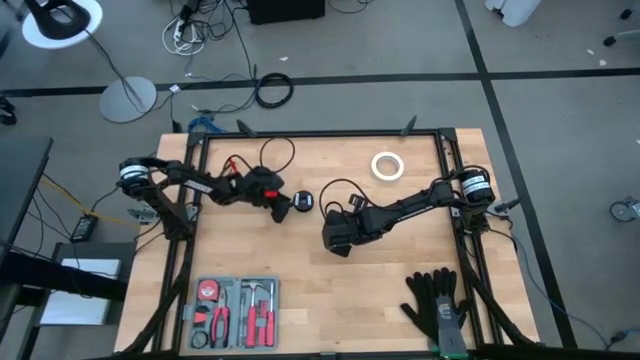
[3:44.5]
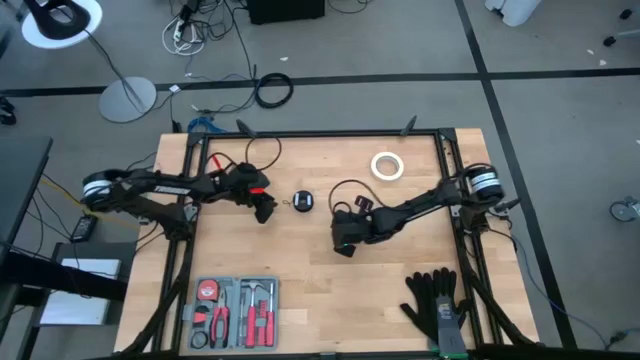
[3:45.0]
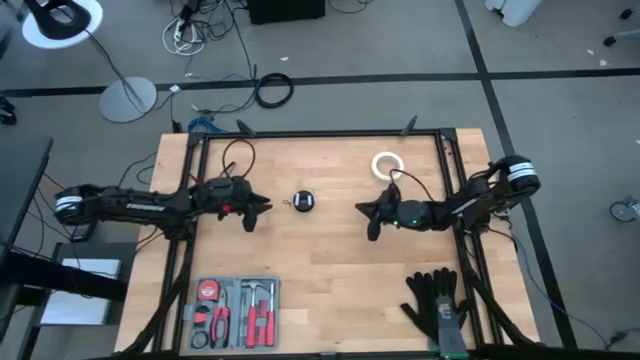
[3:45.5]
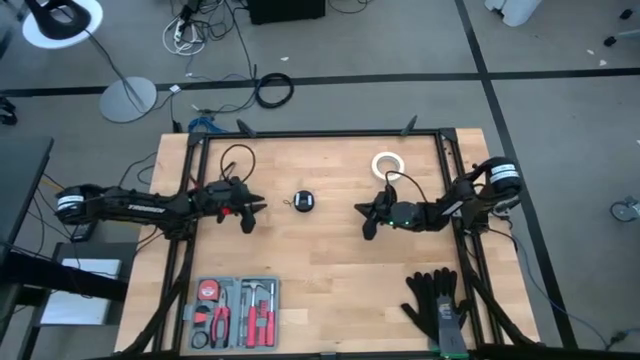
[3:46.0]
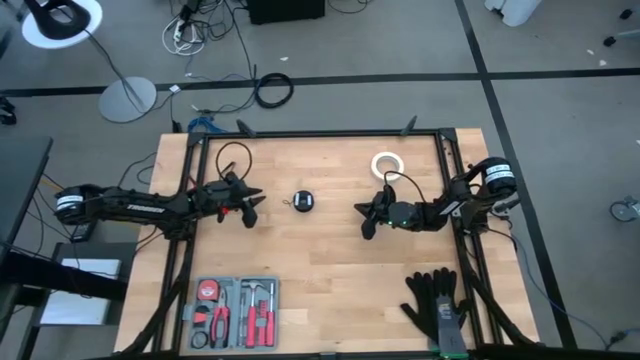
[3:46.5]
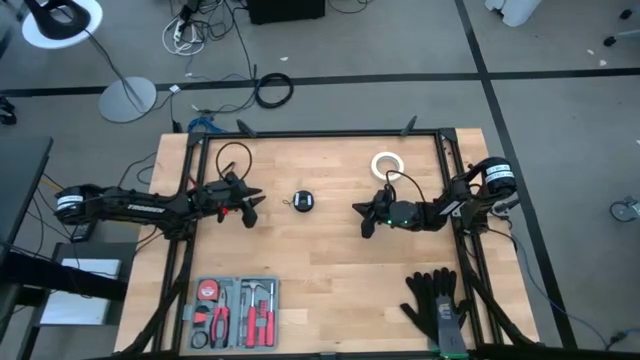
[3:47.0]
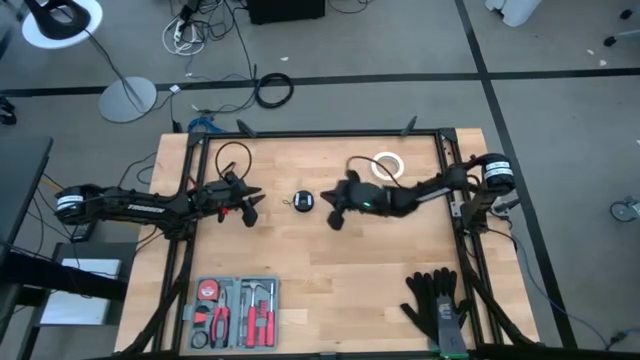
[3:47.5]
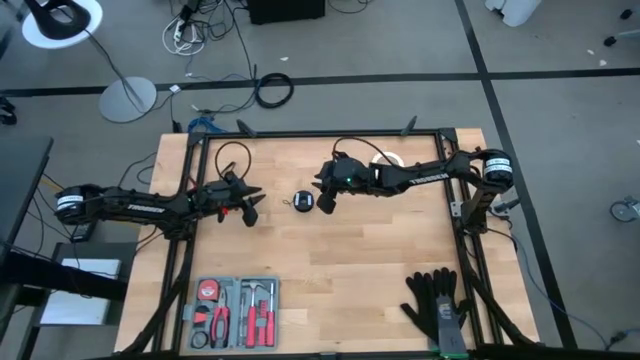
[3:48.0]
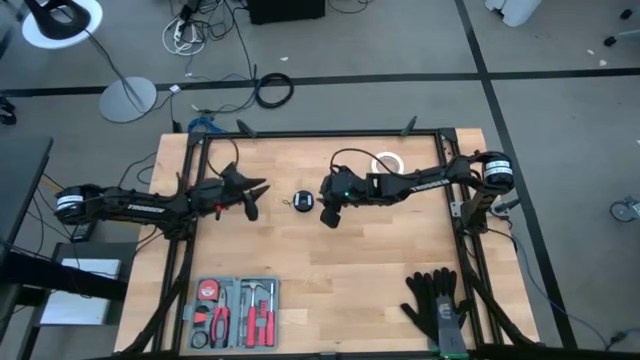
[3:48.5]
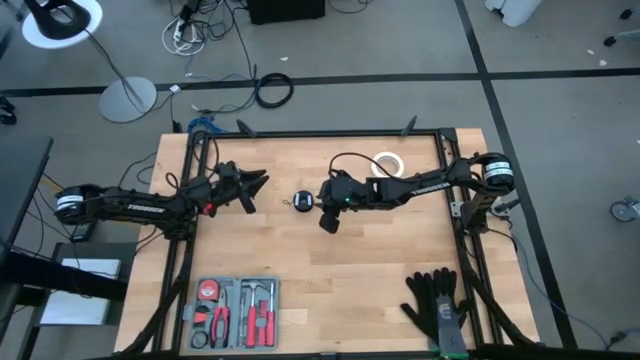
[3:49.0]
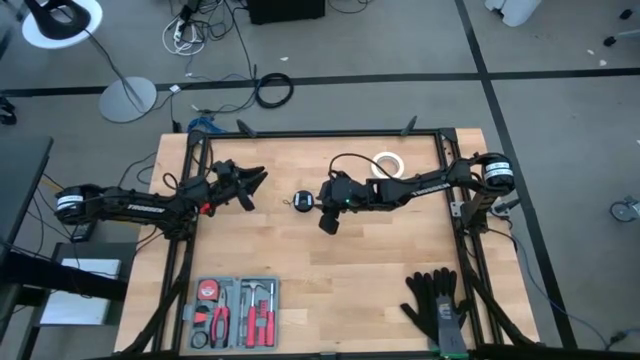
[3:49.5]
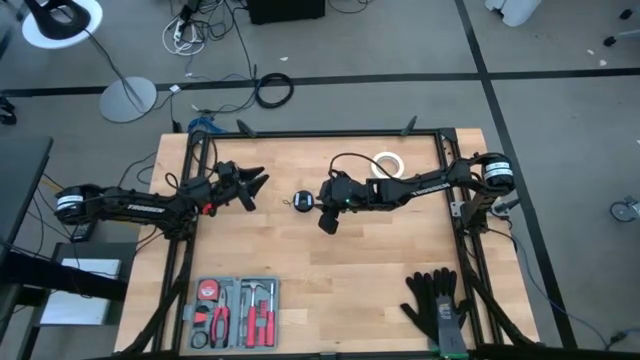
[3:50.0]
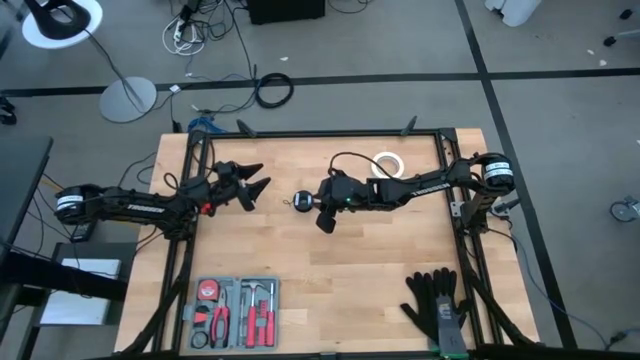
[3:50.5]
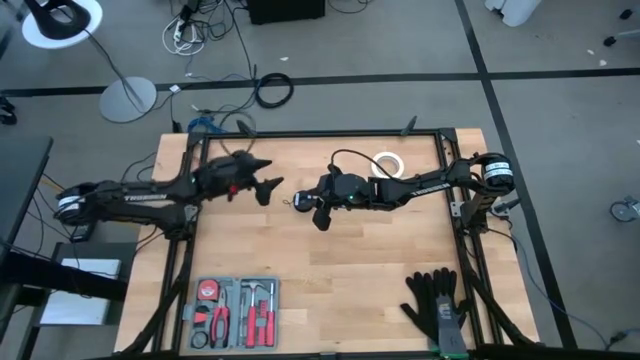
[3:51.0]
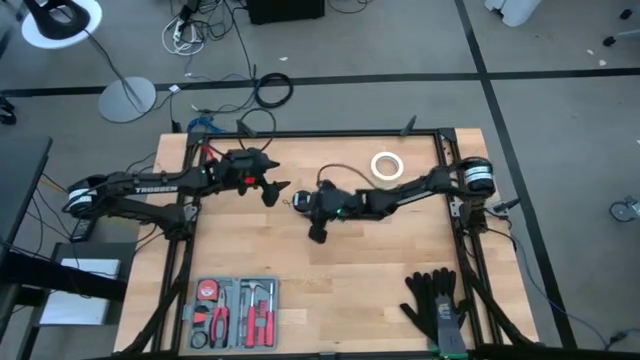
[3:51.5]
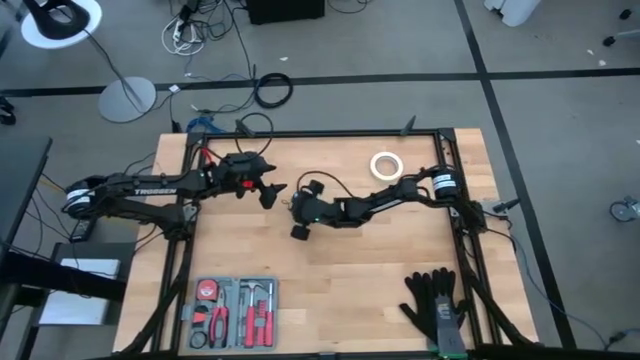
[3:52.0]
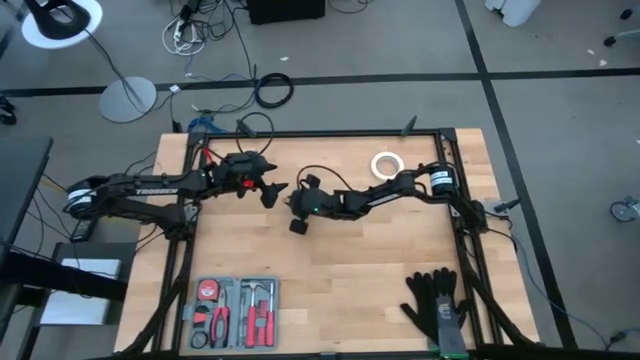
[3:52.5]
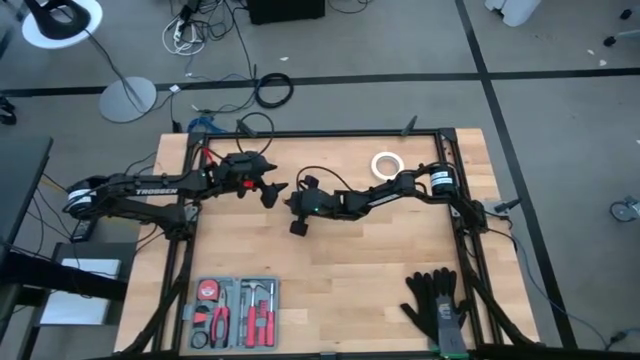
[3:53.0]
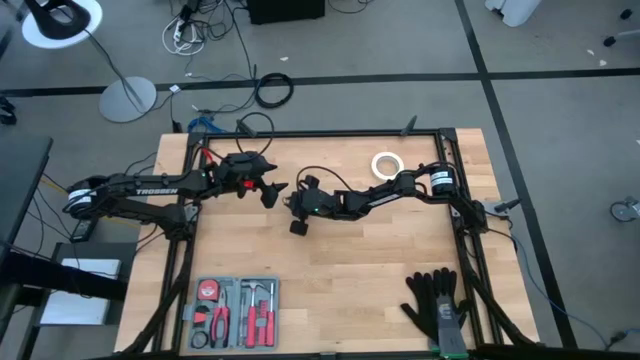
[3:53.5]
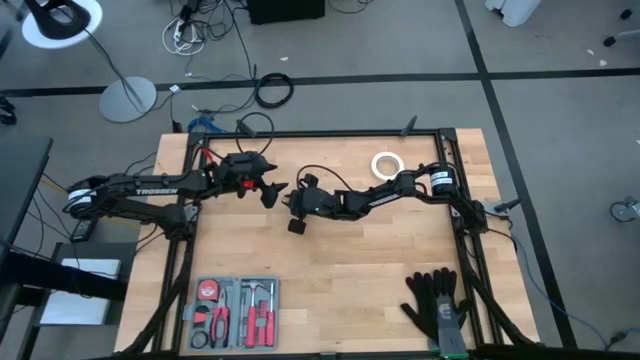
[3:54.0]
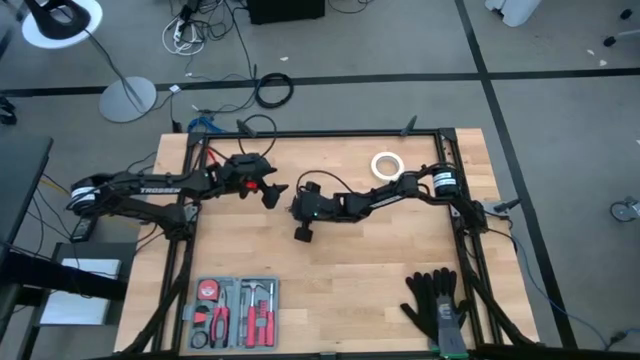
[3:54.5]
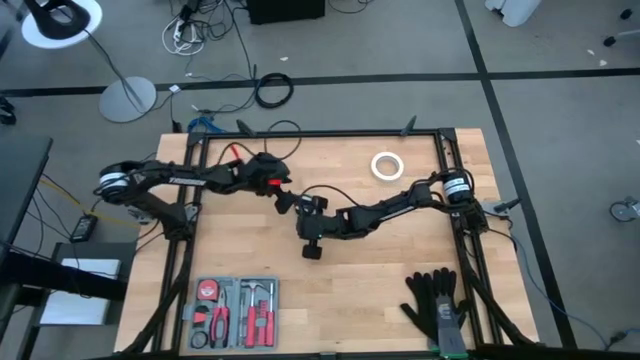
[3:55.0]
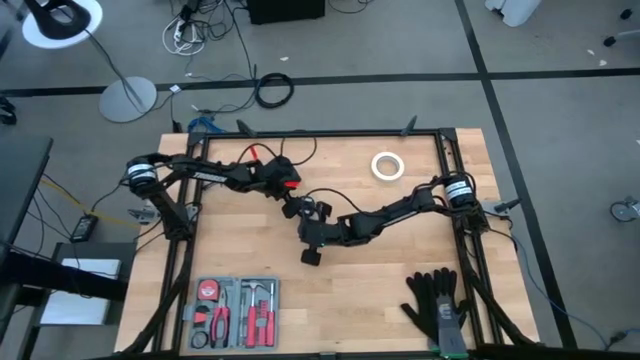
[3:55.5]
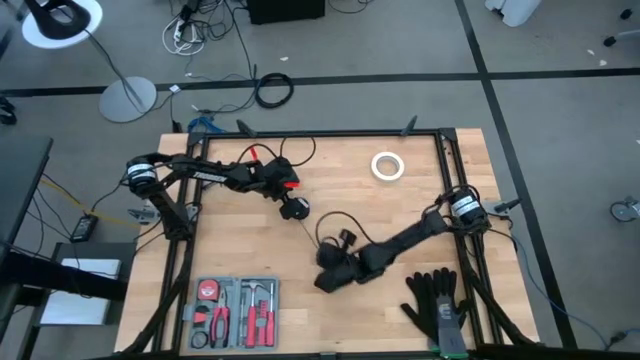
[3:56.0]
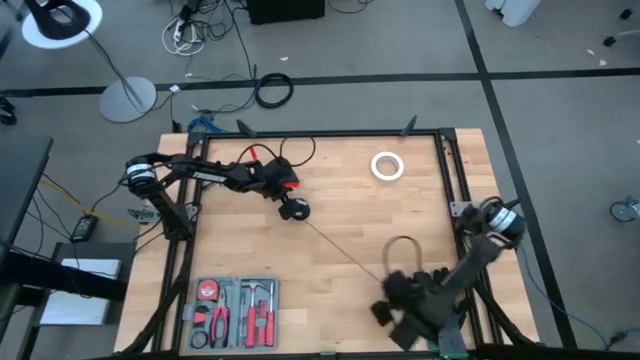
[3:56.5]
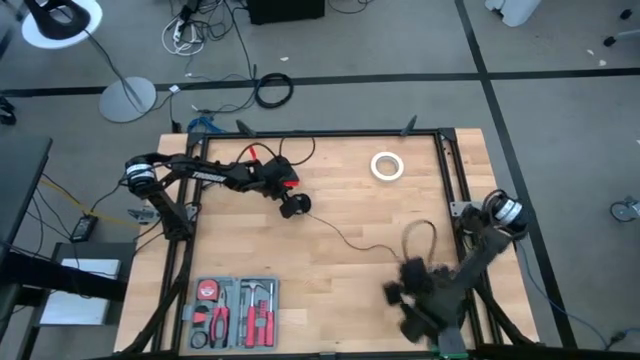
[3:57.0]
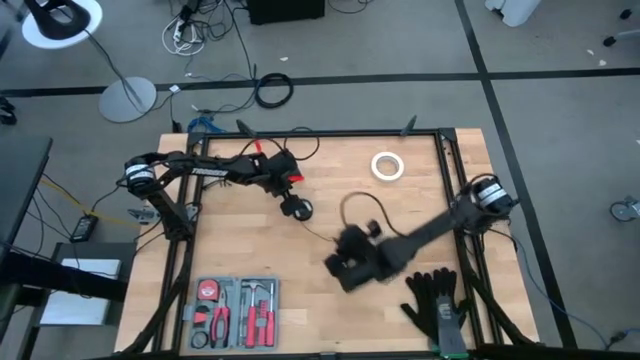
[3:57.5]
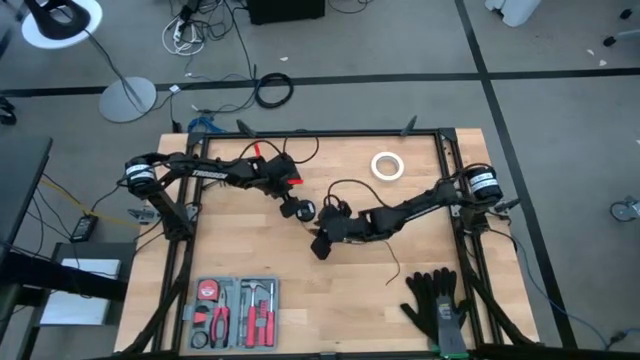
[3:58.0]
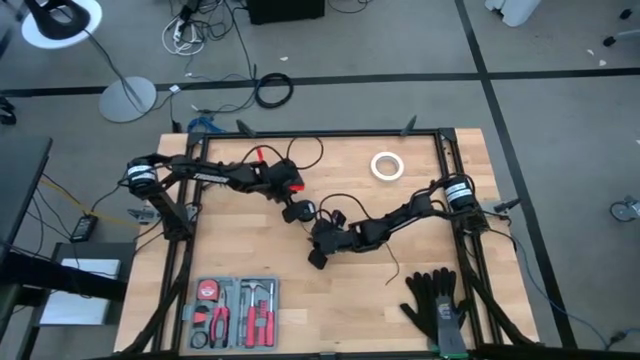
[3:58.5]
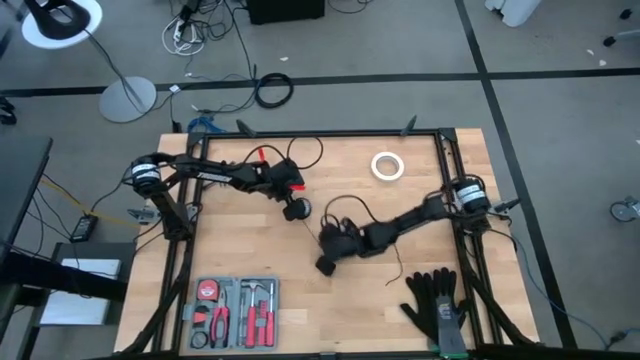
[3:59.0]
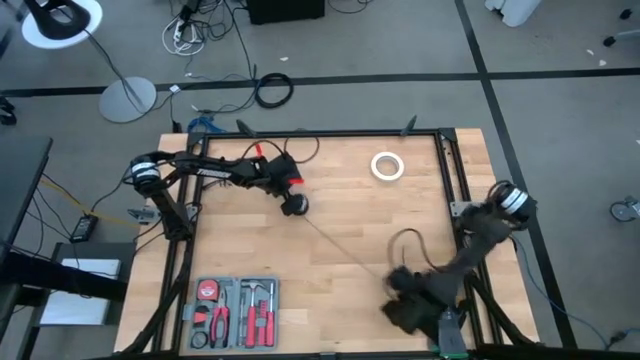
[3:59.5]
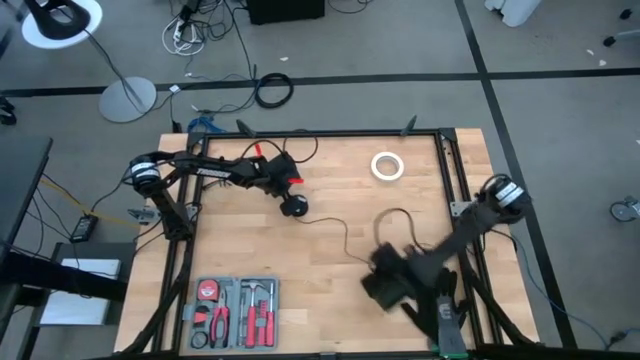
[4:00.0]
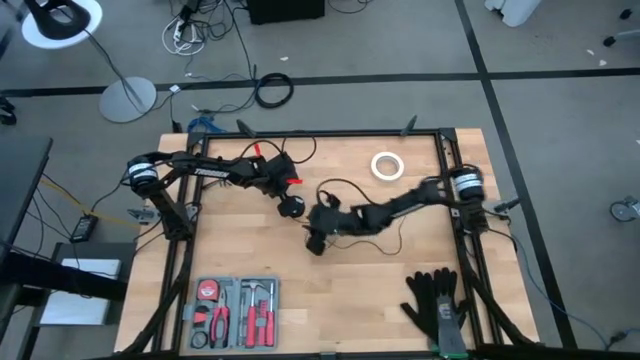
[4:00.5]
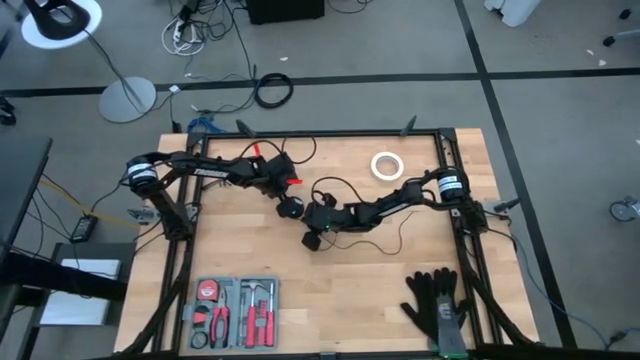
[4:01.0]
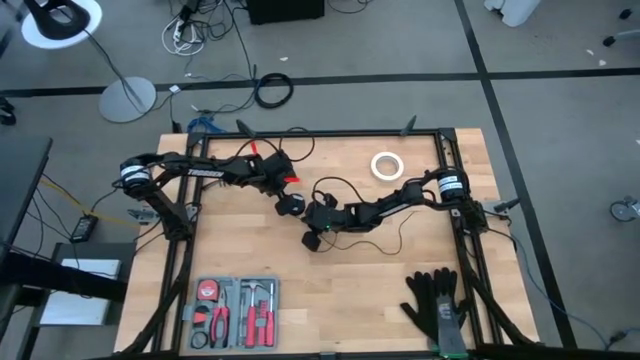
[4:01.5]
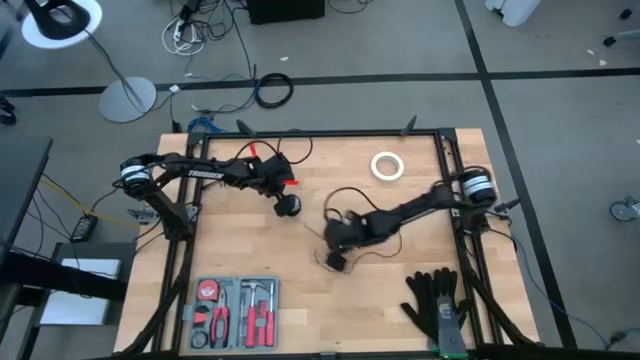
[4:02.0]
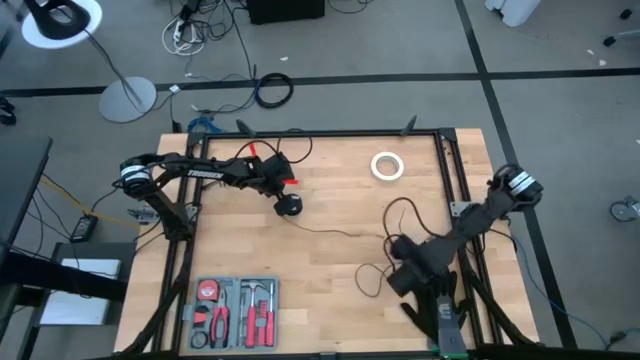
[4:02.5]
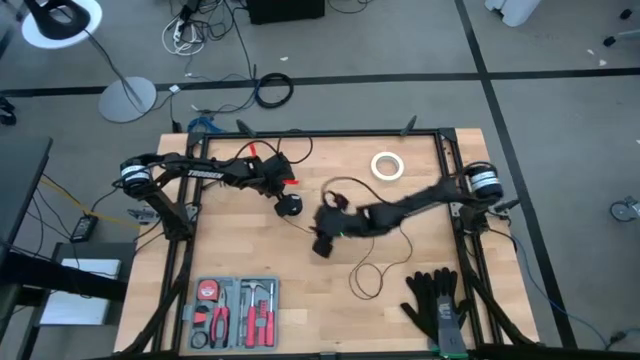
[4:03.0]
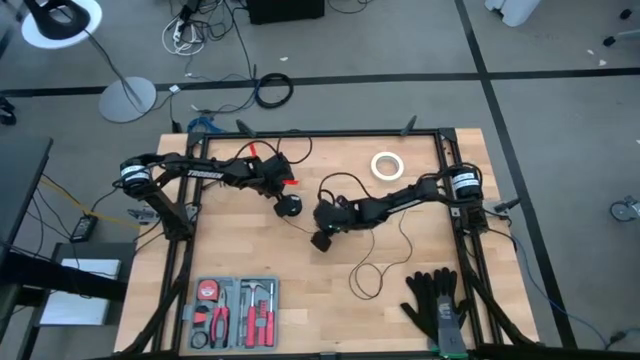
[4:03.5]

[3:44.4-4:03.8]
Task: Coil cords
Uncoil the black wire from the black spool

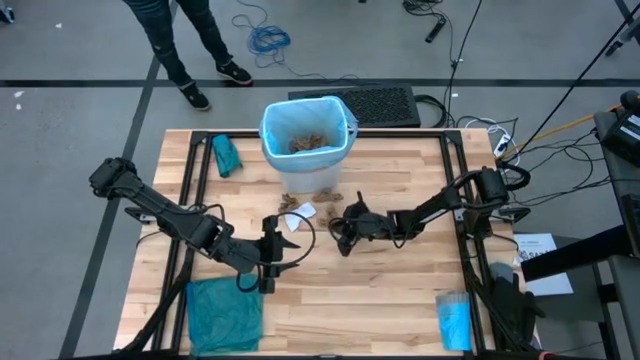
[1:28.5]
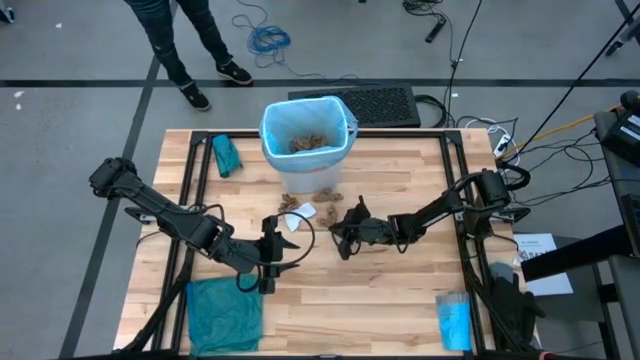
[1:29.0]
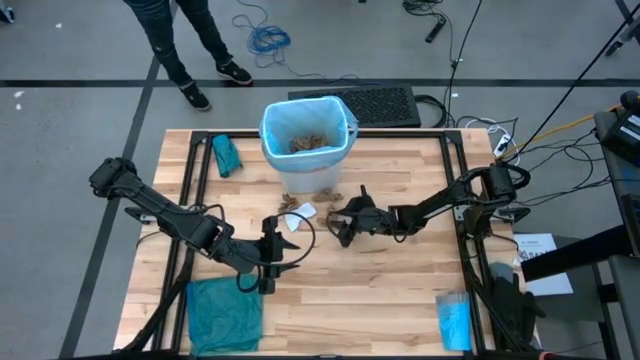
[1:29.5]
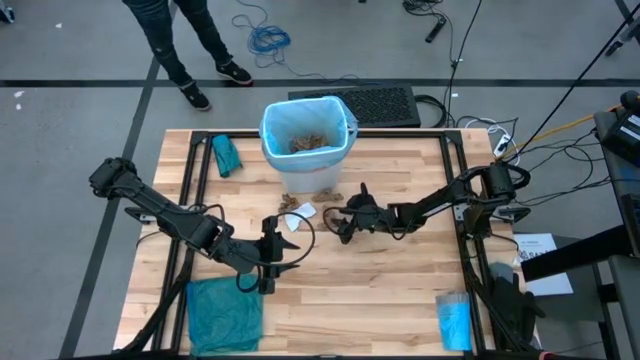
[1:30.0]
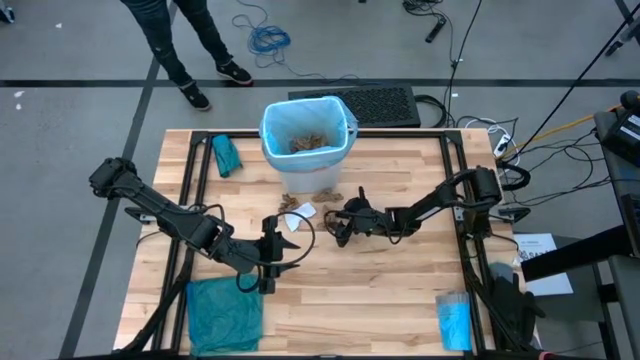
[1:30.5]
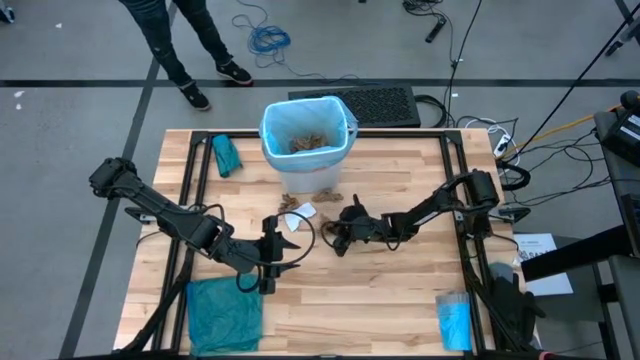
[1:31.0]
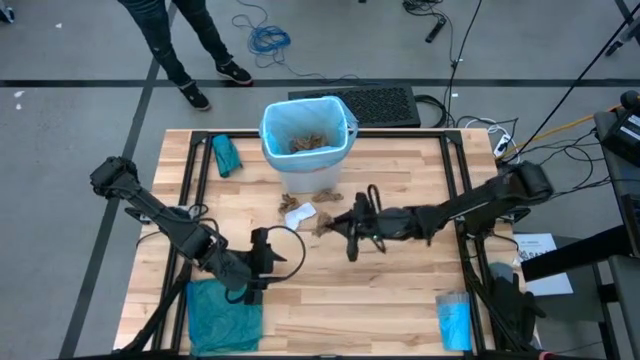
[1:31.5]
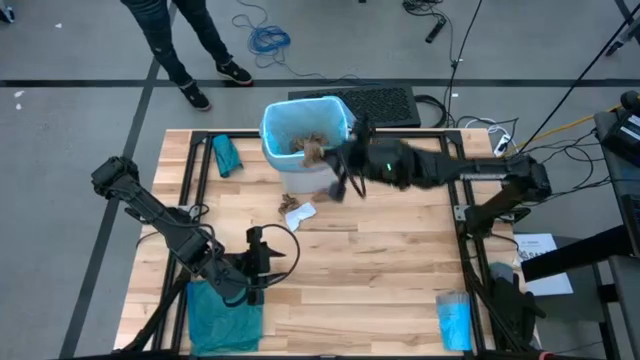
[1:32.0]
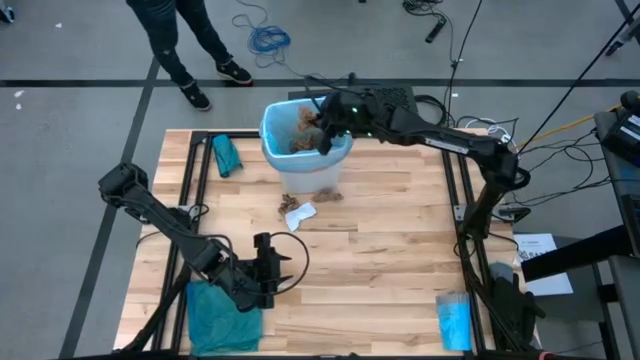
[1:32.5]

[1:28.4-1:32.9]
Task: place trash/remove bag and relplace
Put the brown paper into the blue trash bag inside the white trash bin
